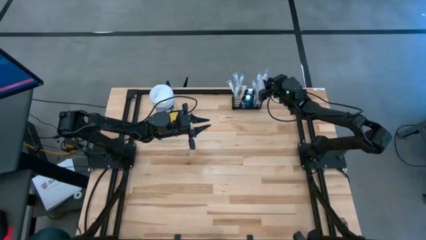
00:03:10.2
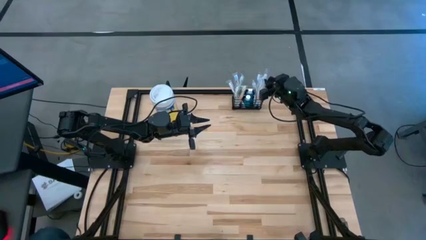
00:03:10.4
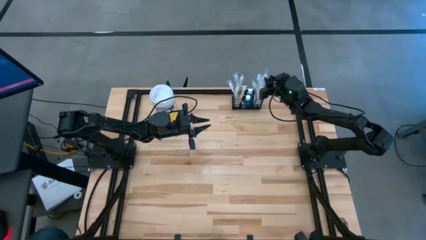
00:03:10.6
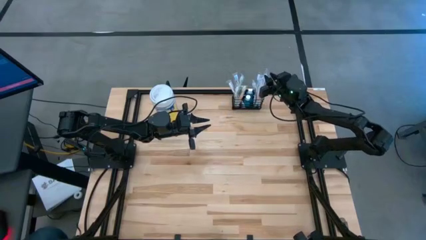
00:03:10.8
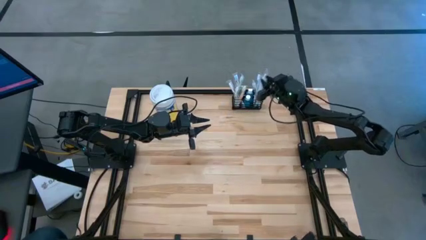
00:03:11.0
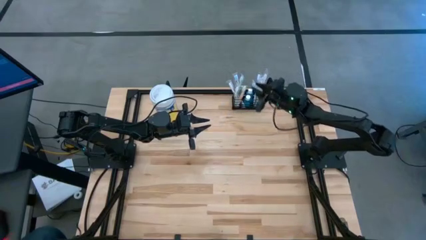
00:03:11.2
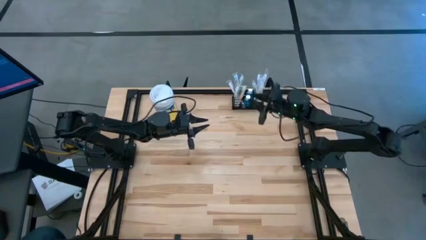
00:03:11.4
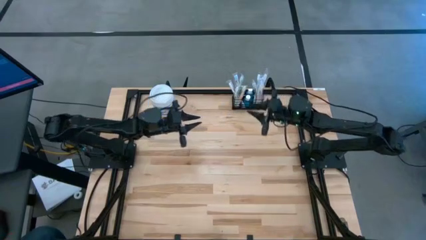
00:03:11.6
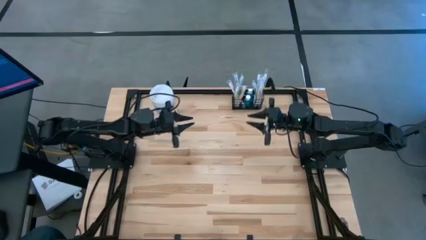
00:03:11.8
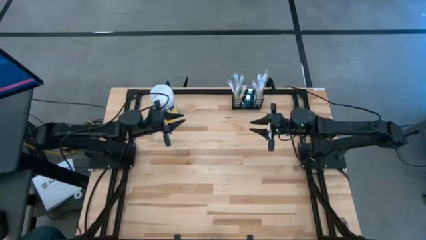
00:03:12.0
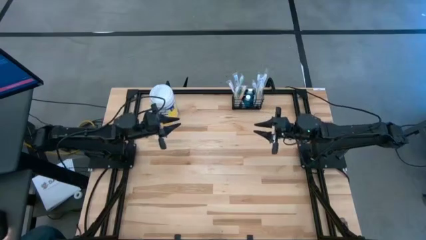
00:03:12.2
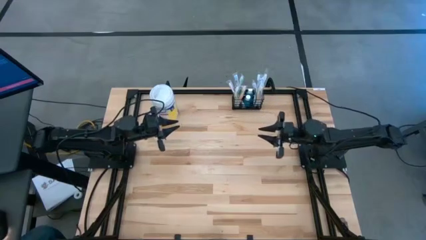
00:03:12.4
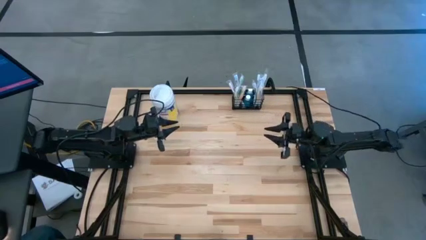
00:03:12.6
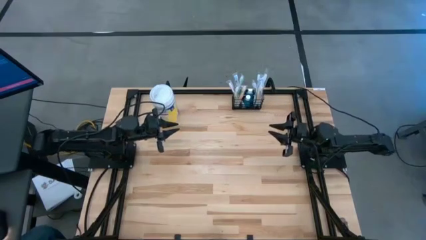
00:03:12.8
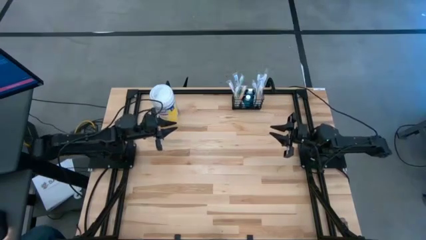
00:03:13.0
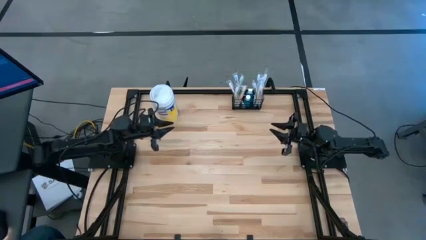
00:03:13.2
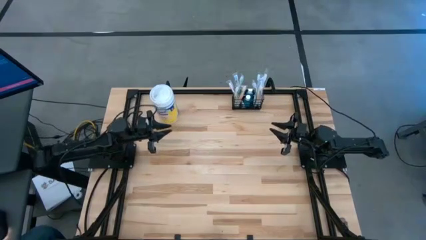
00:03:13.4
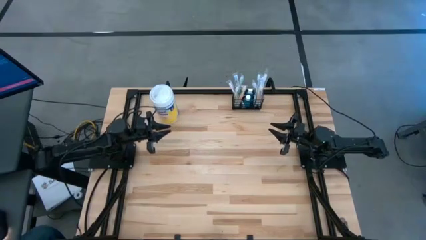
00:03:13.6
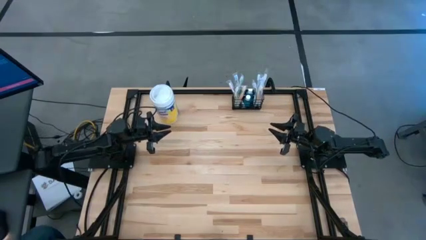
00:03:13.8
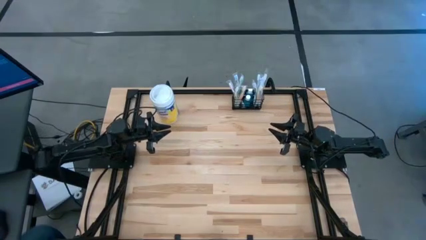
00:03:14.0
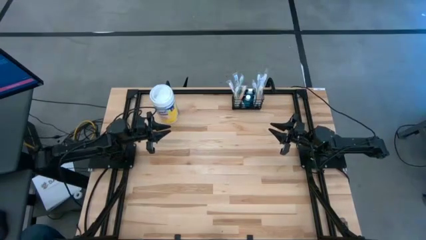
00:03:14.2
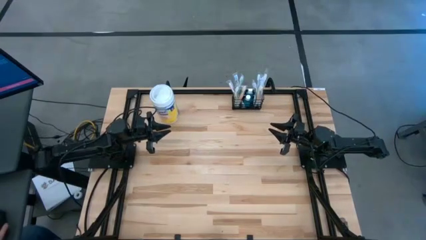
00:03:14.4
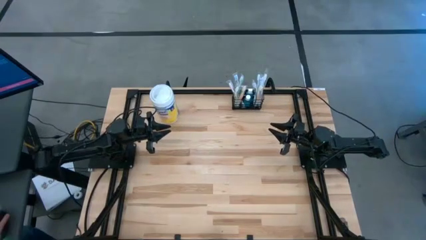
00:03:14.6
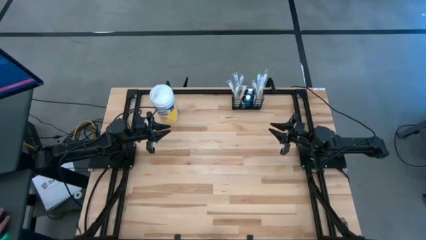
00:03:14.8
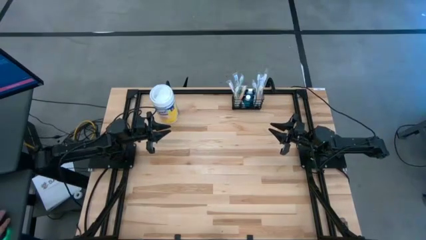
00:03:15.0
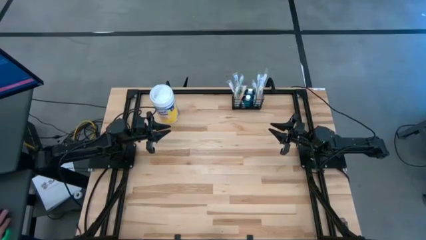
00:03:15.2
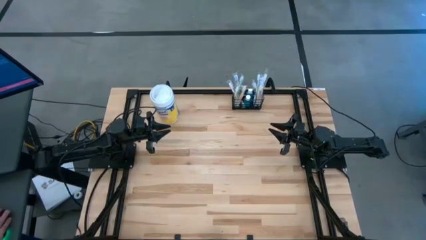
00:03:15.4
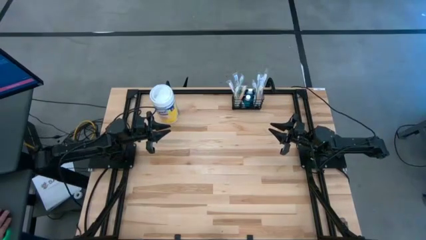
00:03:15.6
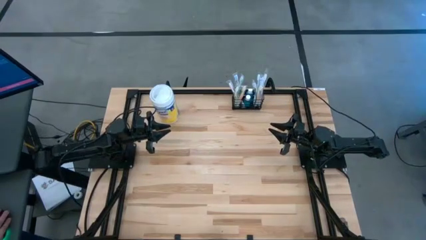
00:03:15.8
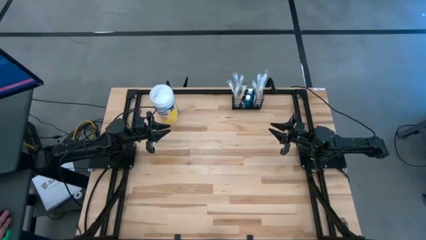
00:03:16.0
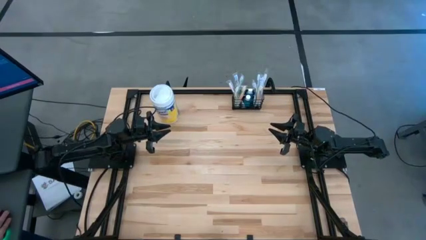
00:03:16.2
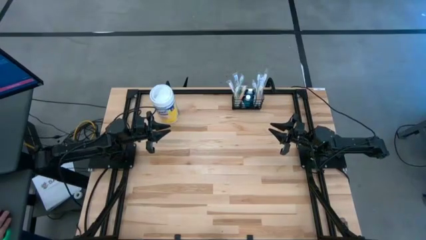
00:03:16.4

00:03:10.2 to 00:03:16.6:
Task: Pick & Place toothbrushing station
Return to Home Position

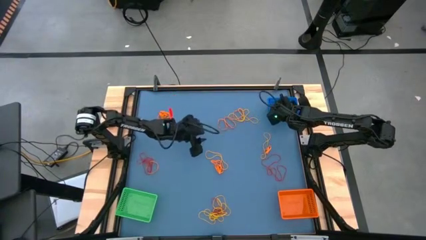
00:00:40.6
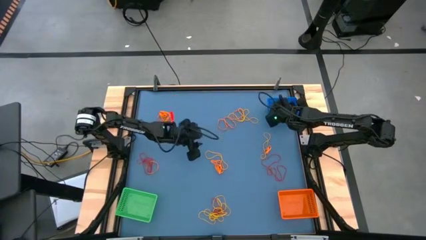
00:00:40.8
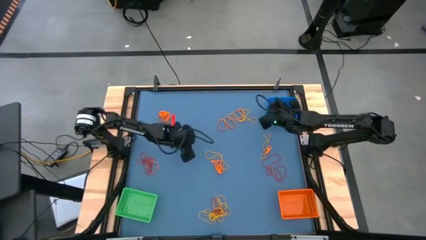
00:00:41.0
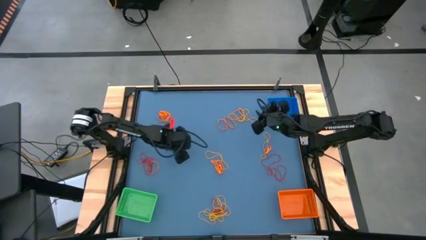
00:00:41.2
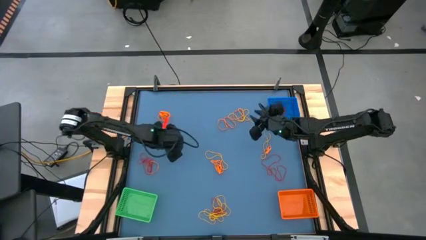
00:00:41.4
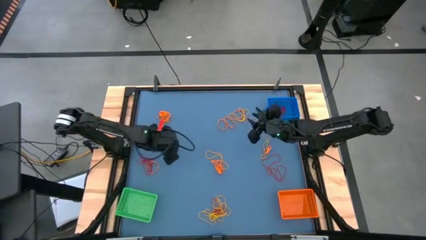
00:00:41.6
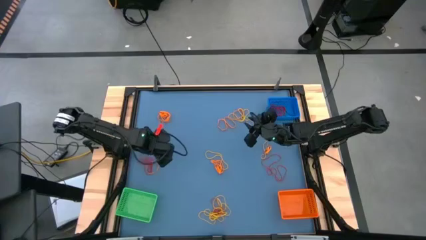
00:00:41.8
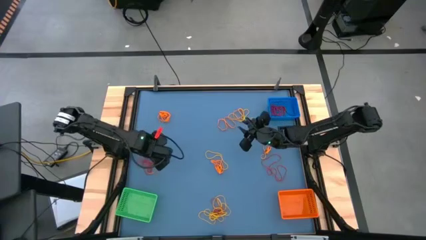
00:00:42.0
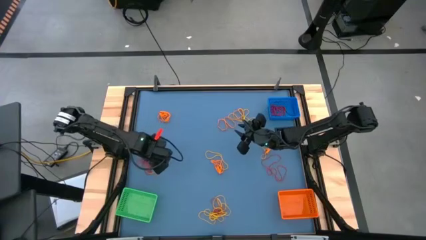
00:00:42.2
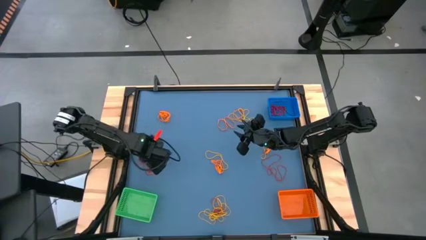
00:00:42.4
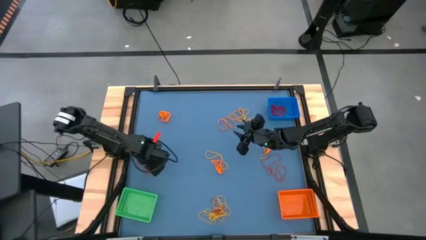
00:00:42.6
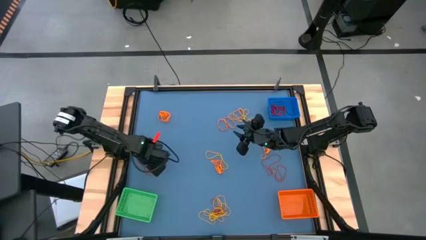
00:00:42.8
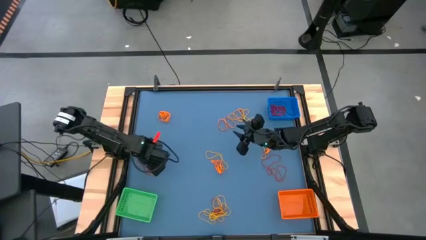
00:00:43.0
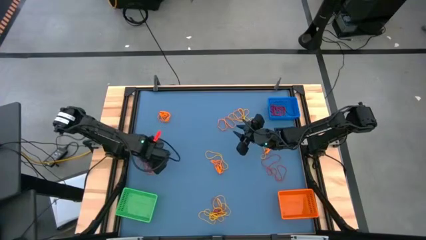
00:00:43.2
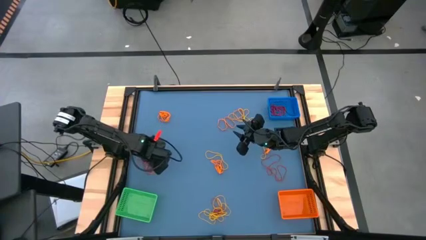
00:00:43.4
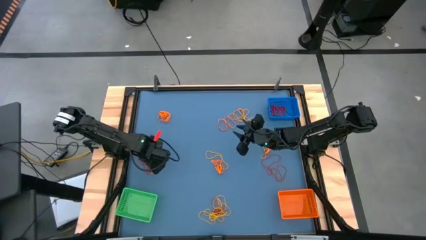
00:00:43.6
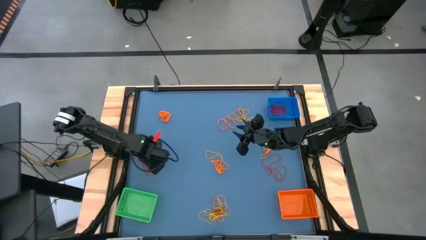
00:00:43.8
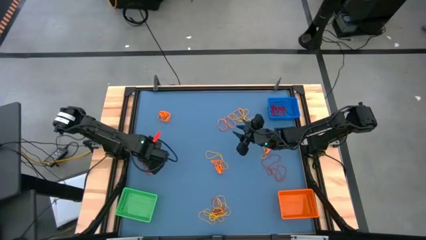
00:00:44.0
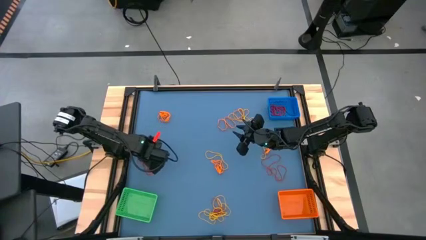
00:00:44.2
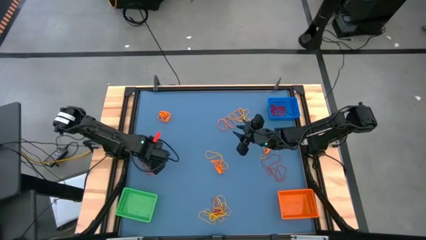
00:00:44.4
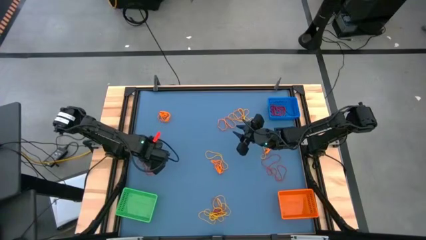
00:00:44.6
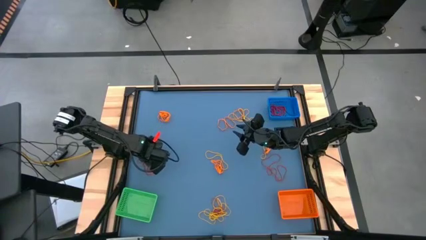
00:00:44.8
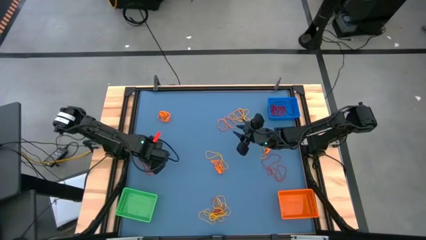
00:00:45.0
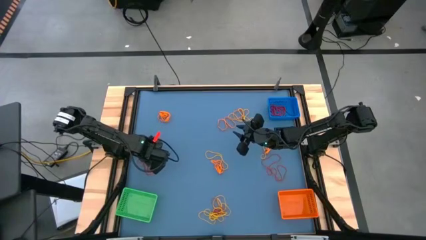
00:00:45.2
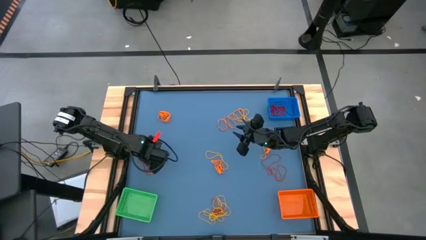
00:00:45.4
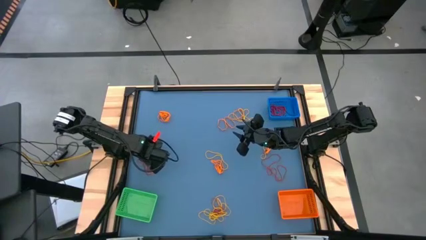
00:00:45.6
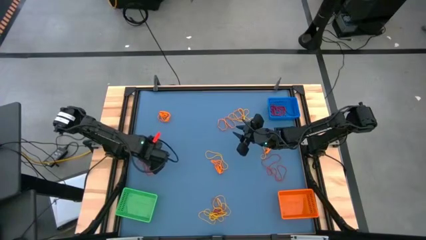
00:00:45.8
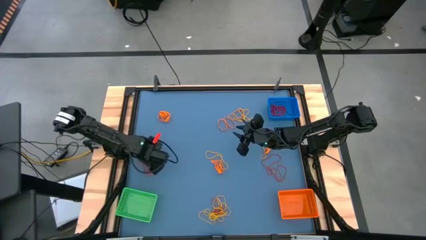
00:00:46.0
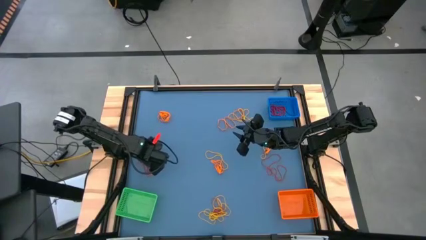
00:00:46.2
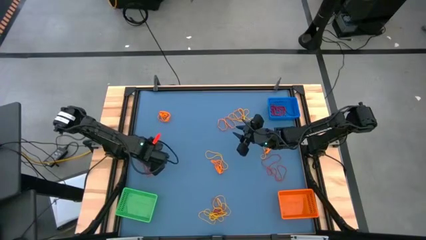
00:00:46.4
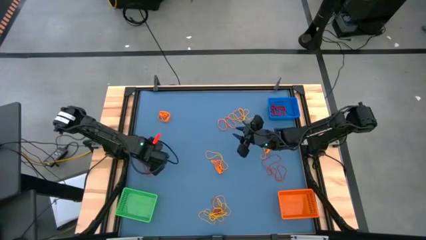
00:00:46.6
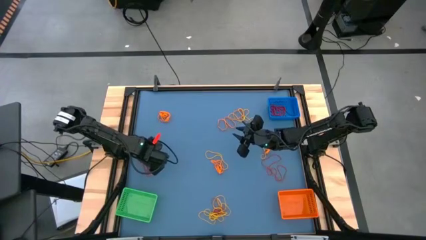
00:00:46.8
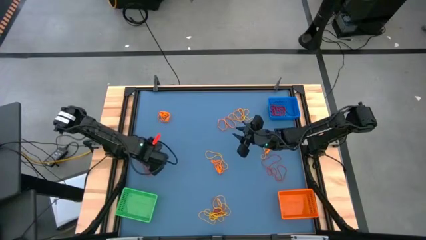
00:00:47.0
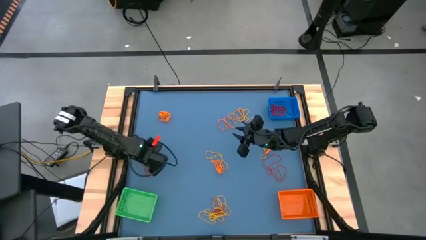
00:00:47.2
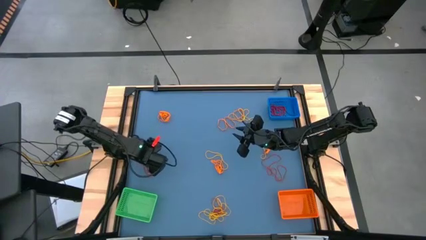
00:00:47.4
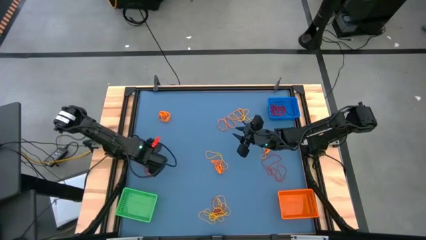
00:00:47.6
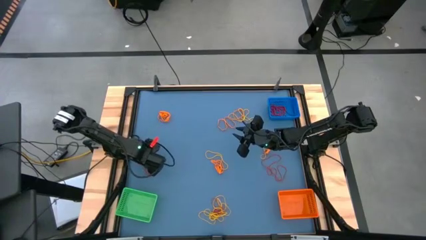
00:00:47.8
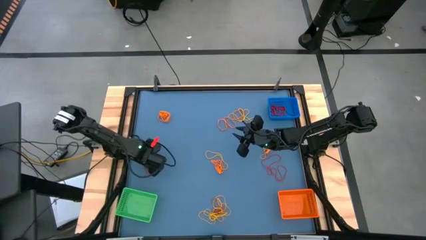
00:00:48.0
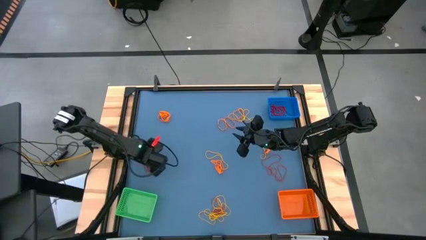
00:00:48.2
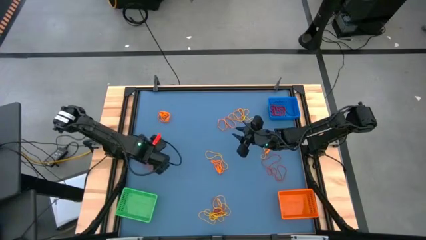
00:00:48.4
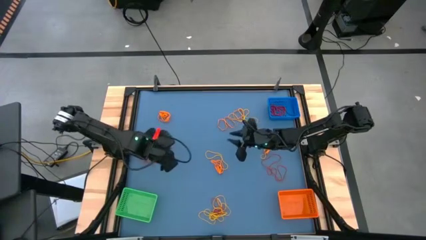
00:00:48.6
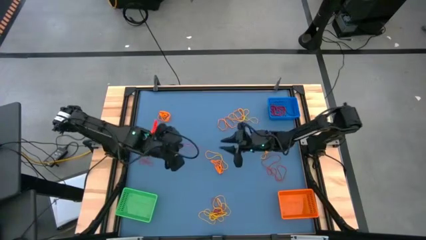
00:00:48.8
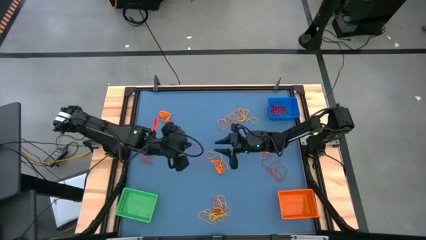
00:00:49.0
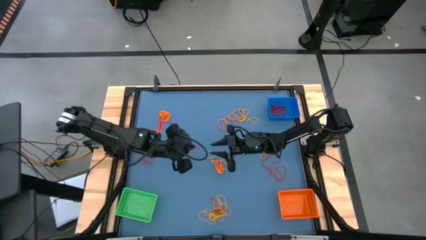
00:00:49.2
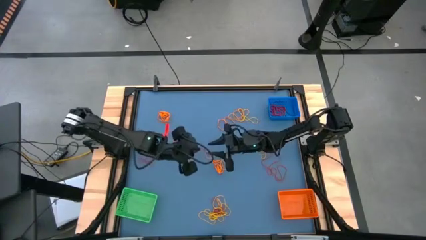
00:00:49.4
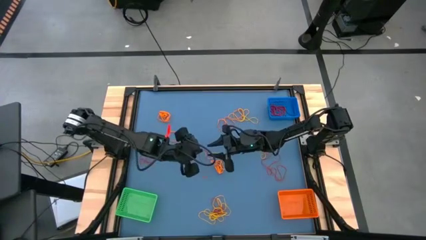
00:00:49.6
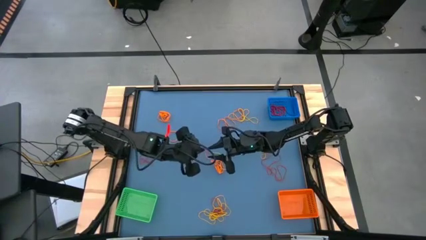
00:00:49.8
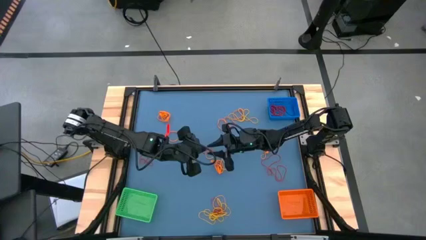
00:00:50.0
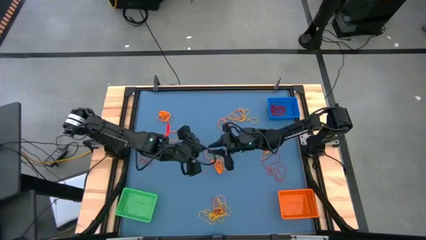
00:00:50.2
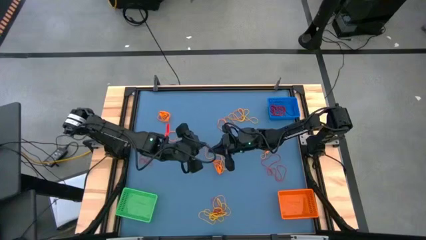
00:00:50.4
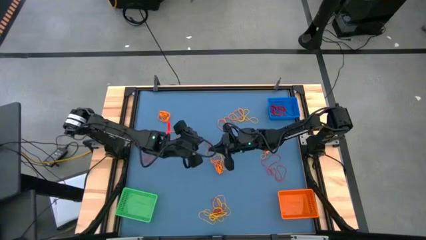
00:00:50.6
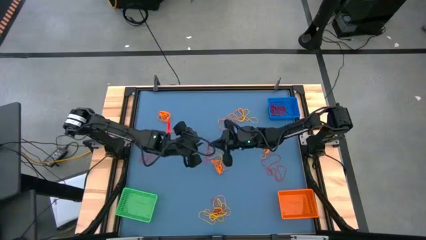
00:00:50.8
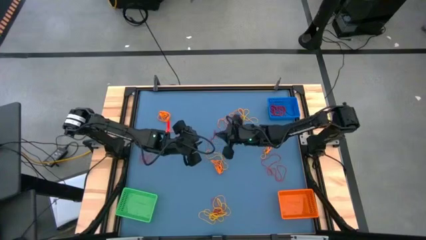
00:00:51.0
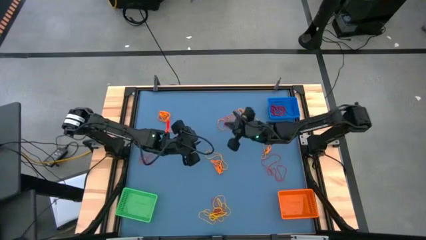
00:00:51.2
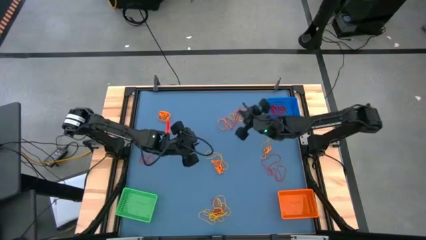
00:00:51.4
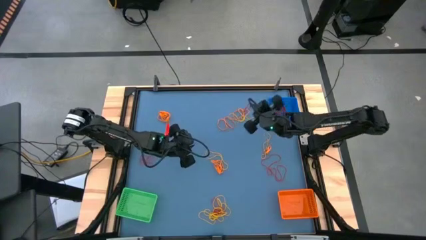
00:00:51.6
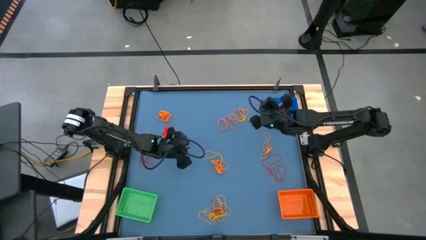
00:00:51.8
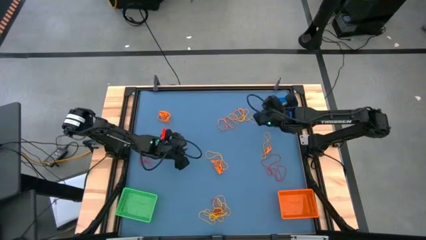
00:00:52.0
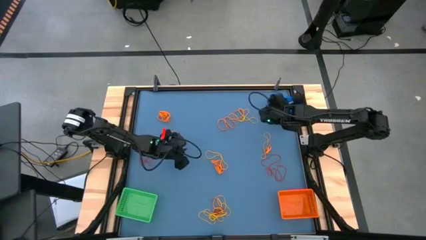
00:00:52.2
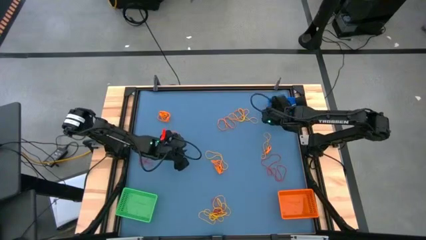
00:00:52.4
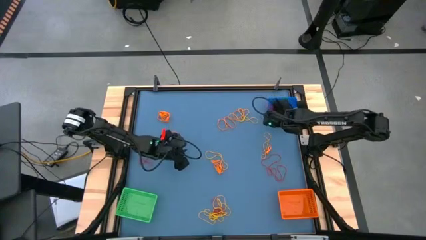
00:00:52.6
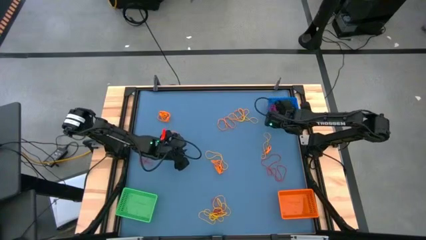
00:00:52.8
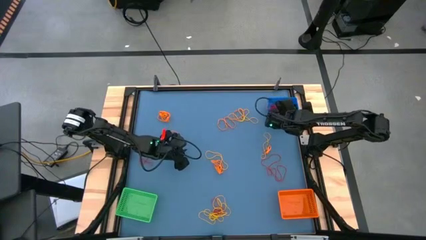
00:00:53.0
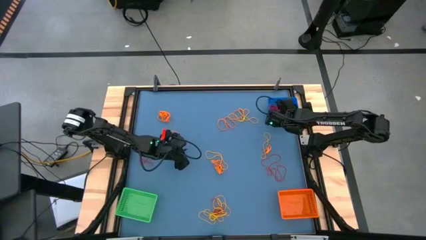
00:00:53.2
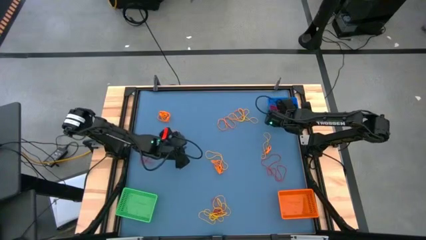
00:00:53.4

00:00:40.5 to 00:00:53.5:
Task: Sort rubber bands into baskets
Put the red rubber band into the blue bin
